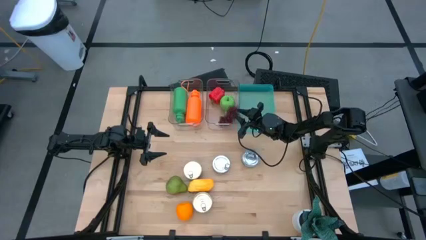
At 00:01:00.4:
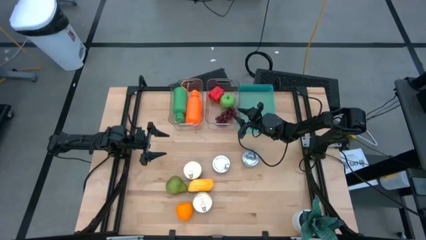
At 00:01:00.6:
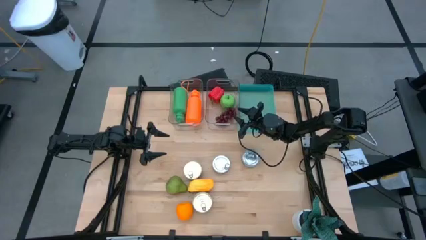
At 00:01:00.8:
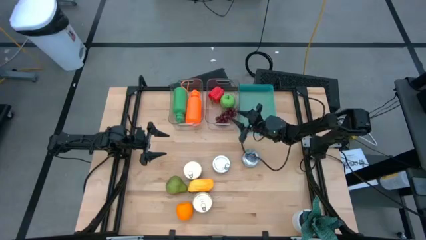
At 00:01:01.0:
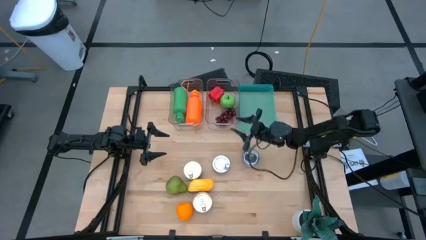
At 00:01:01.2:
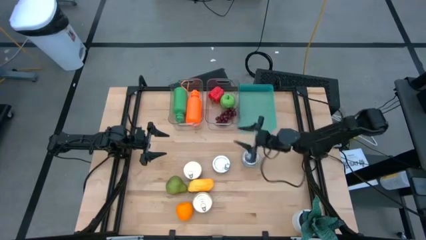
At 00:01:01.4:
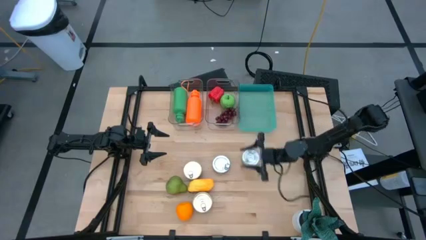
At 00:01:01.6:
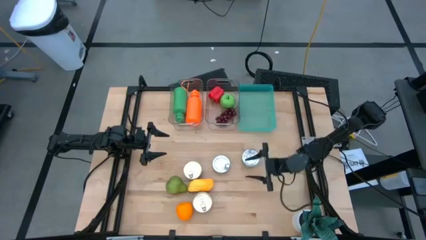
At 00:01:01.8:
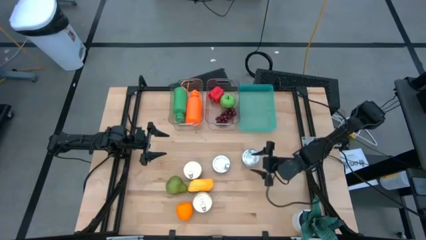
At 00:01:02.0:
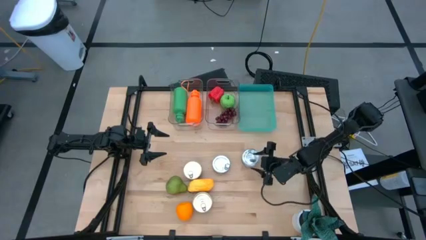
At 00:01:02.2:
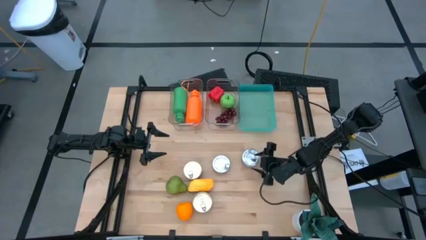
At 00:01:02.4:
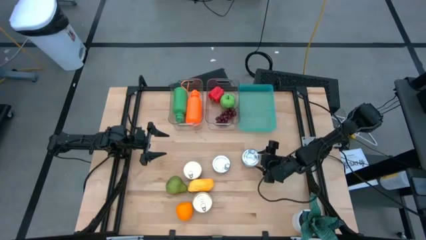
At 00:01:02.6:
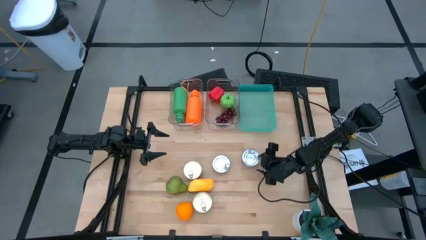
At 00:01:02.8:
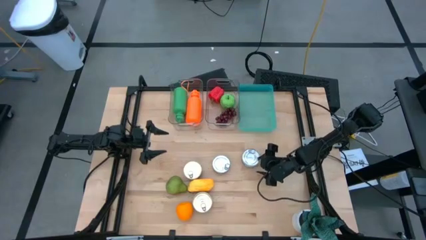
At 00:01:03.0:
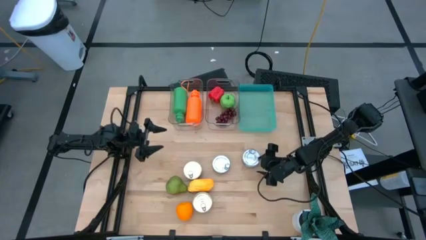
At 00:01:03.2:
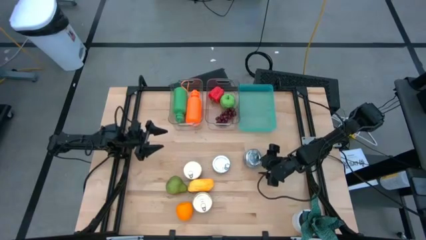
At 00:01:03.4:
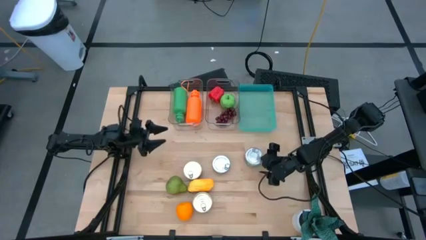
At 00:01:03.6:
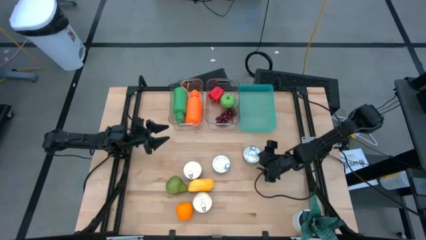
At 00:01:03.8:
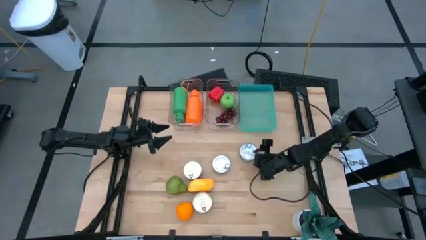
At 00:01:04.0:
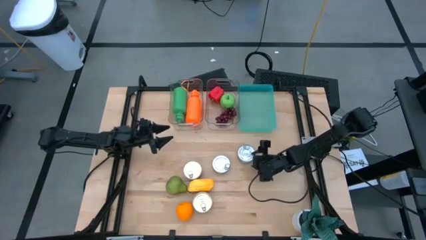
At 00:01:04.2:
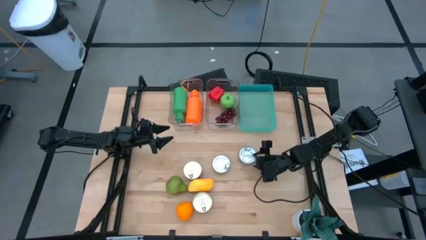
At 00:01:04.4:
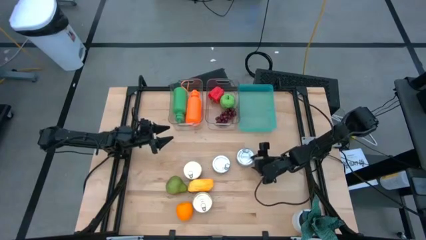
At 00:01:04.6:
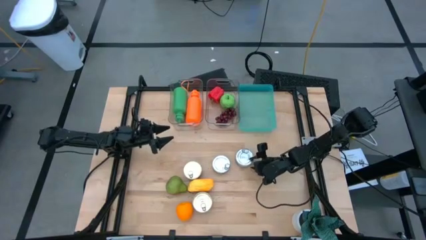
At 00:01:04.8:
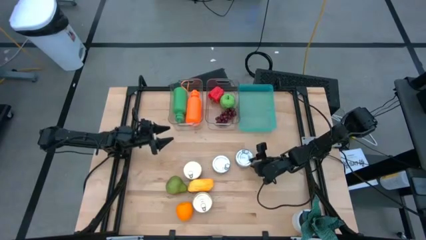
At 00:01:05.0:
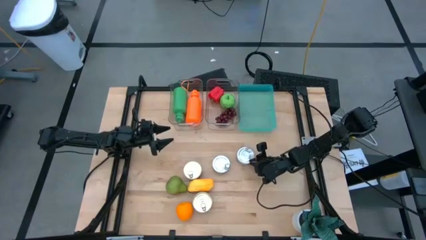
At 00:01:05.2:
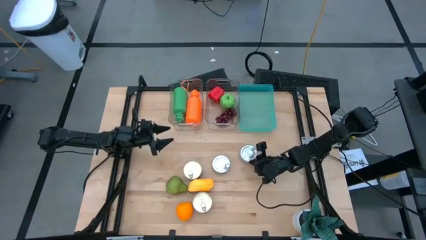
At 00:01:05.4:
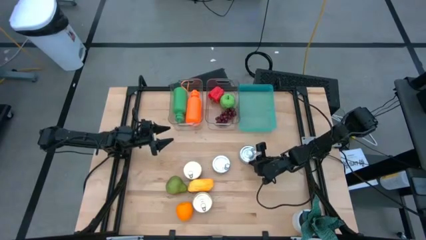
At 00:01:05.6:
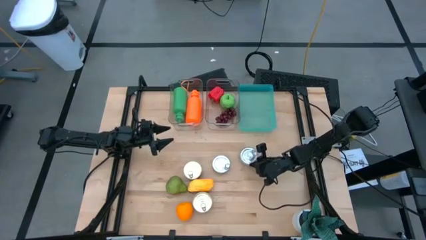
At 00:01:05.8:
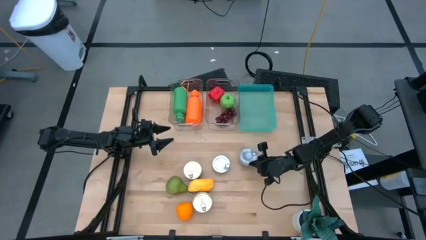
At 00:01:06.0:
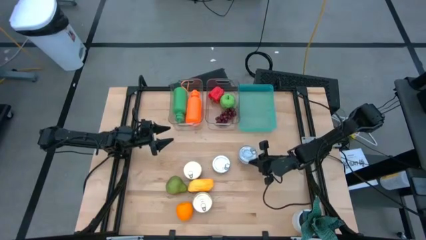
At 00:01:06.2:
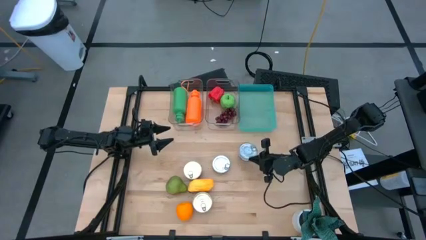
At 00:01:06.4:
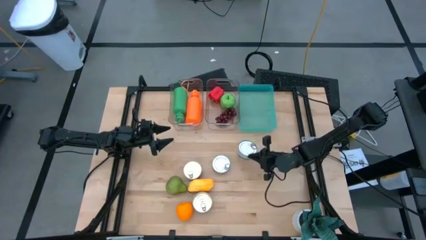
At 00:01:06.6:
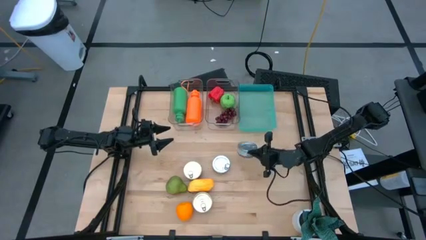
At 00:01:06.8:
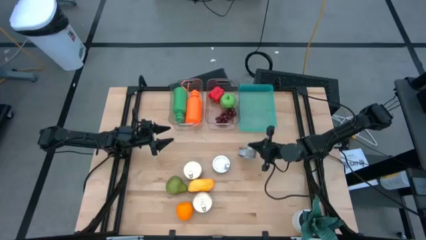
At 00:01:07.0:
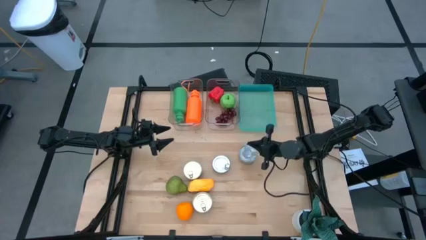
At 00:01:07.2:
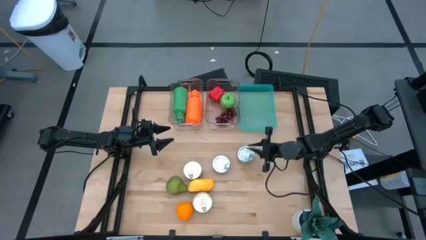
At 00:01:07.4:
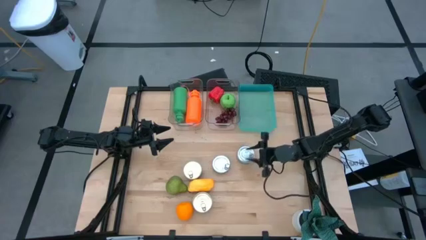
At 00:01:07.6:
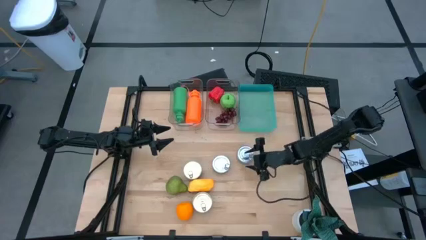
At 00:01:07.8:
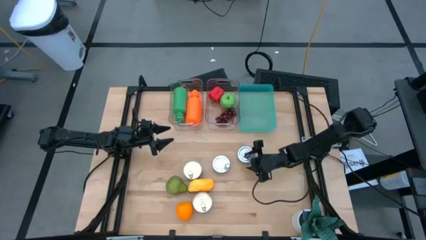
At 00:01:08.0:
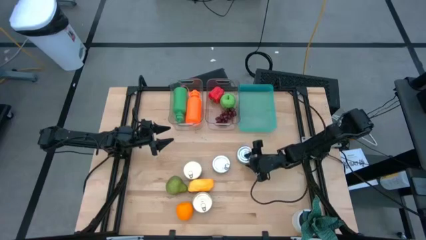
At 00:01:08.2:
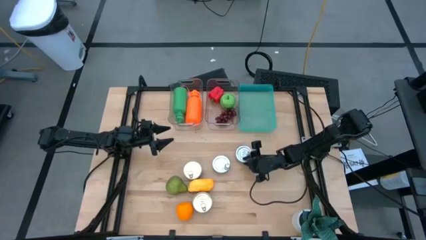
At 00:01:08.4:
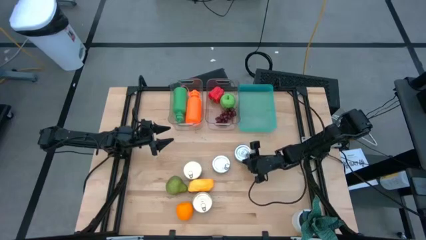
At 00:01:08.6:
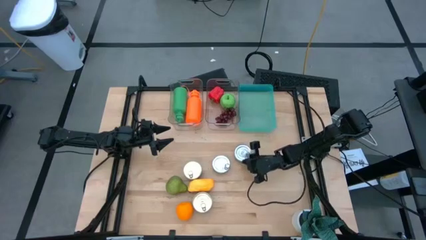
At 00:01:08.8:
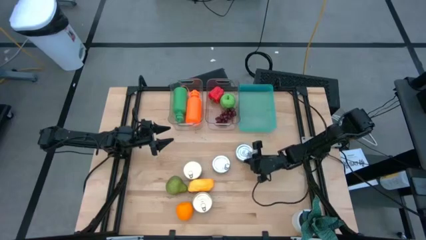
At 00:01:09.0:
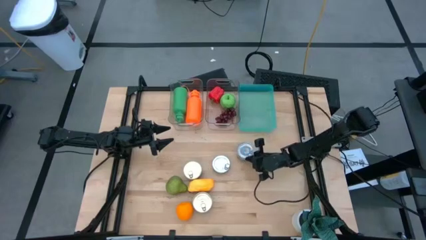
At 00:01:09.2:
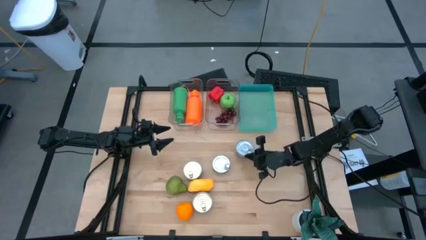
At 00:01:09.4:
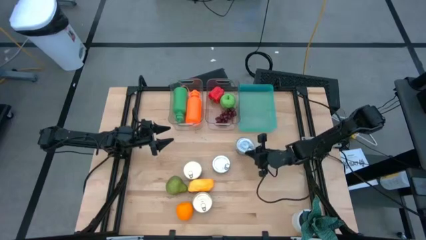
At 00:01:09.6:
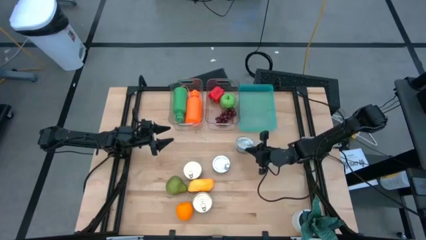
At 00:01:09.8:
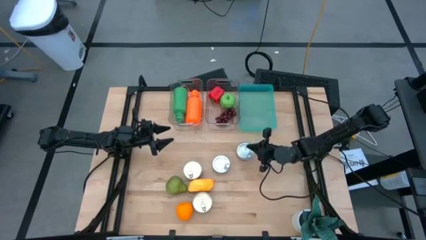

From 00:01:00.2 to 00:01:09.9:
Task: Pick & Place Food Item
Put the right green tuna can into the green bin

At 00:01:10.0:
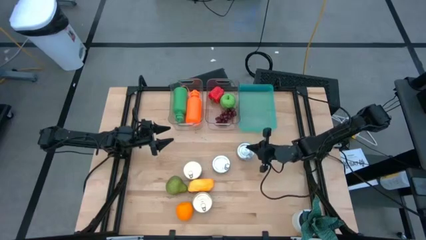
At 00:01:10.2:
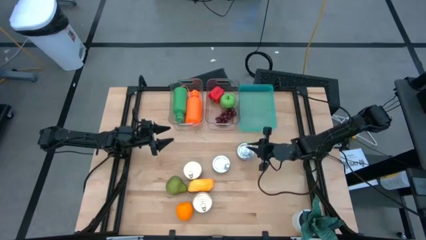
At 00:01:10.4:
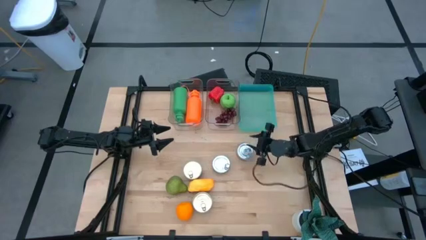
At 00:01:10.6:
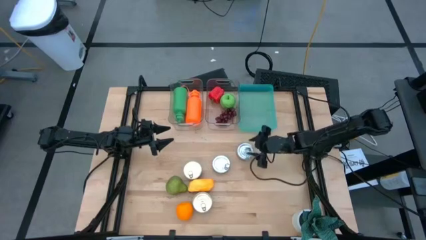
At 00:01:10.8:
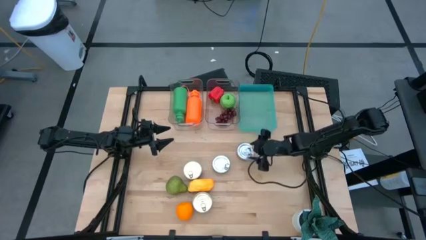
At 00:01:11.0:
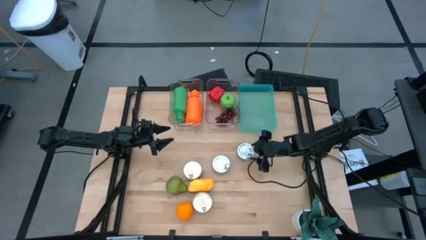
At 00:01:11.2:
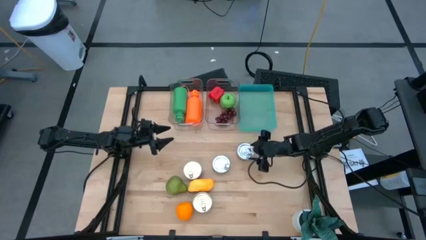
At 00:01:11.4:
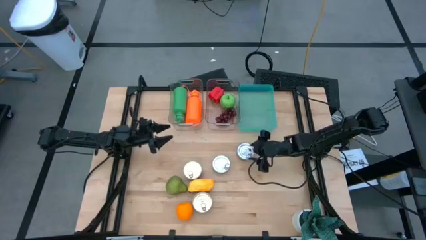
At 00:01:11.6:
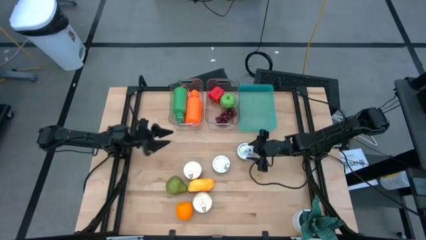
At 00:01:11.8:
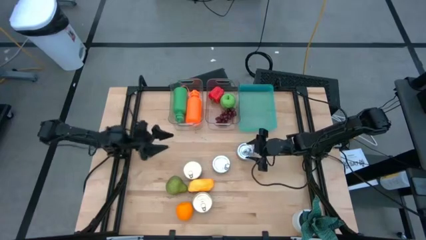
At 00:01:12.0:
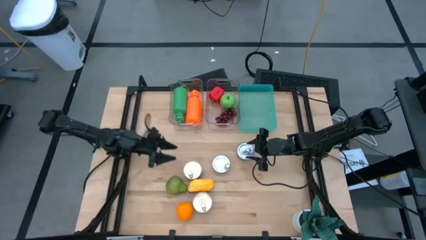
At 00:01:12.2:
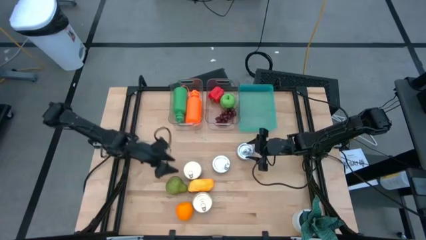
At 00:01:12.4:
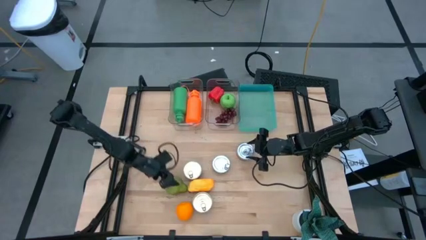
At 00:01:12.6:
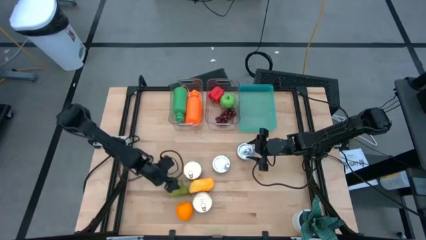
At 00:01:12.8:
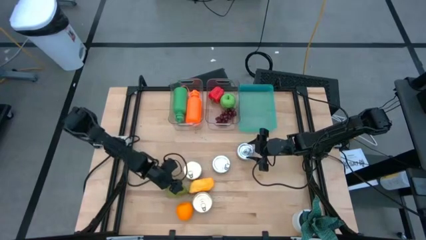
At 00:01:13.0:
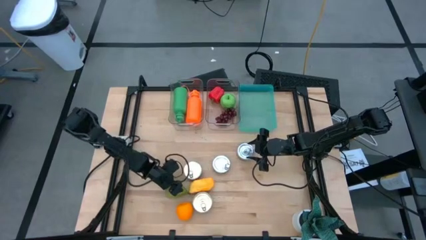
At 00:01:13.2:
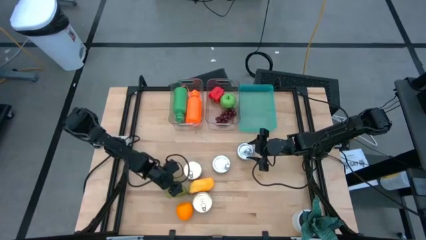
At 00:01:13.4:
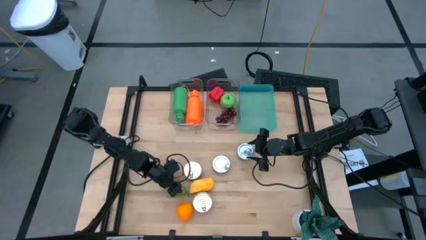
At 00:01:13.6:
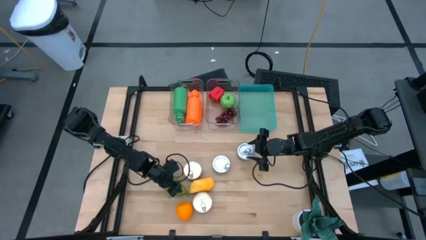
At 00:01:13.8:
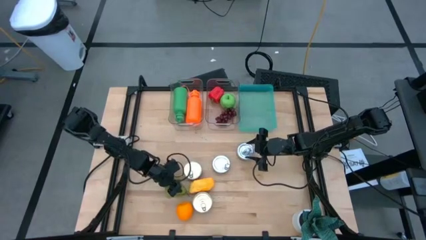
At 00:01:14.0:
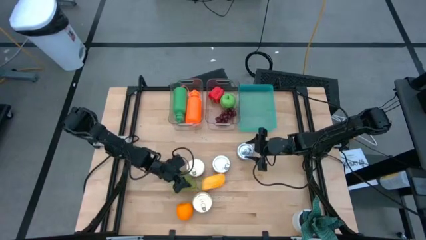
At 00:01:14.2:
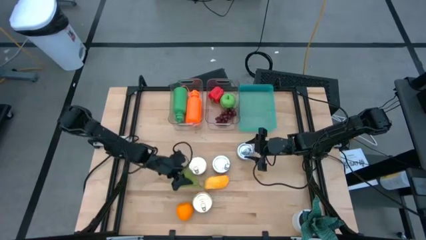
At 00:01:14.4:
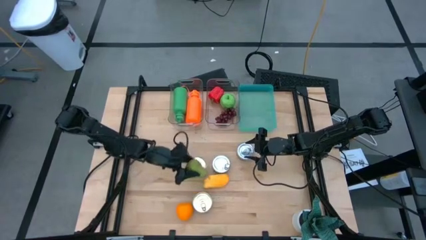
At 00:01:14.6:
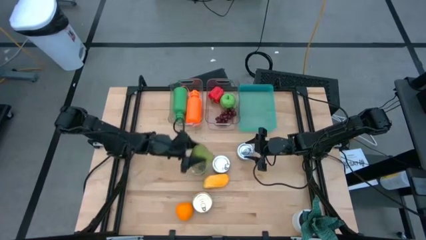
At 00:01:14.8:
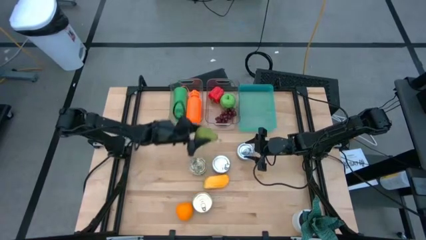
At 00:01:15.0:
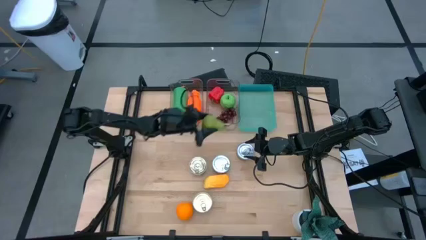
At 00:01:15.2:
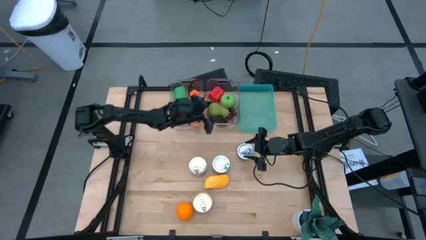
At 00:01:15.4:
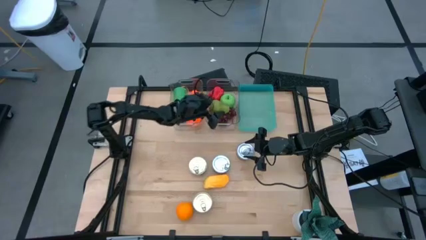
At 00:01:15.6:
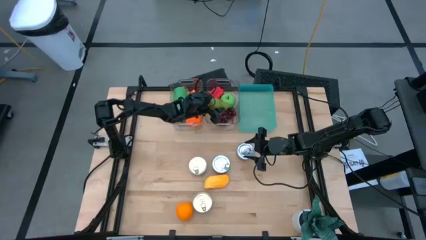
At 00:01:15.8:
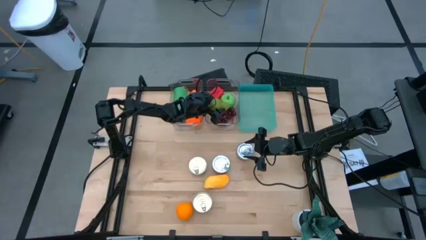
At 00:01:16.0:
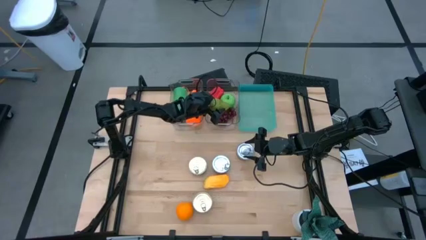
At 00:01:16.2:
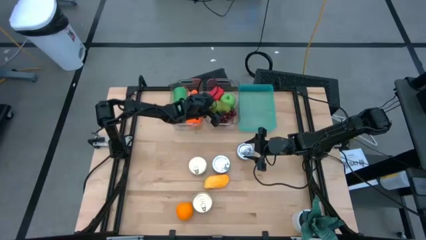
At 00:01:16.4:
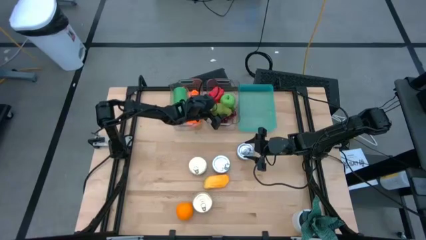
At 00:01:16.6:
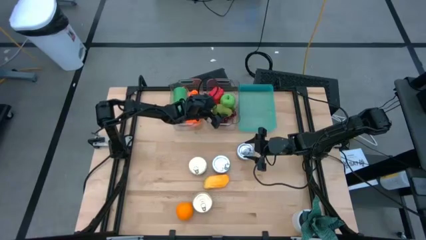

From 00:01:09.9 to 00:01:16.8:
Put the pear into the right transparent bin
